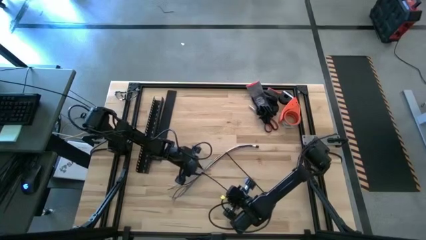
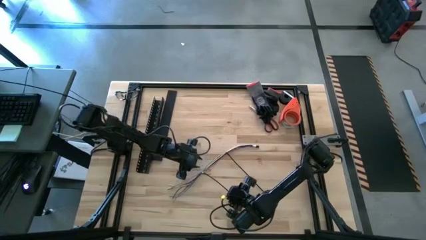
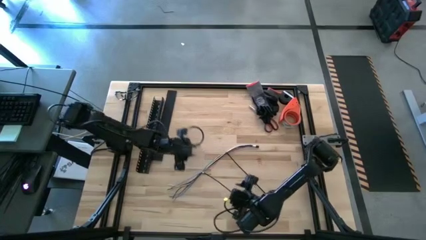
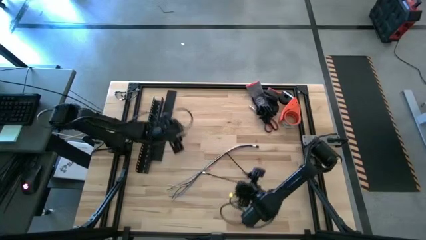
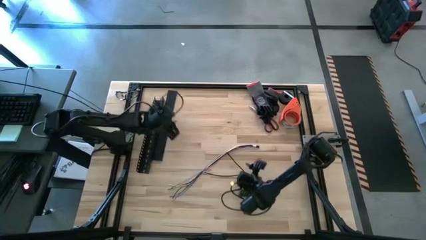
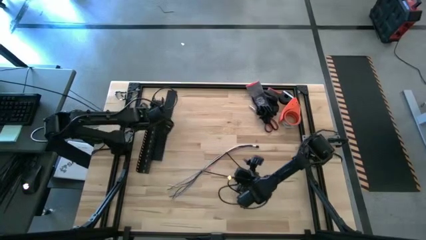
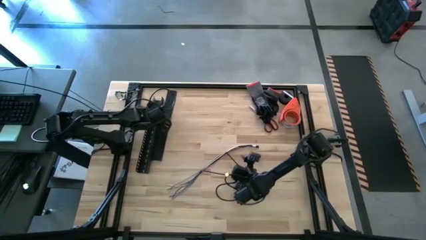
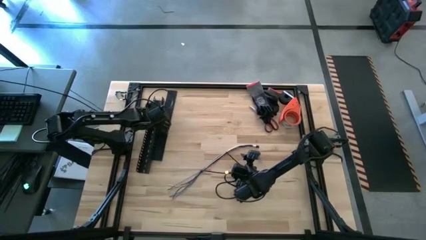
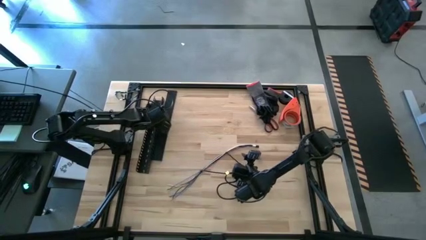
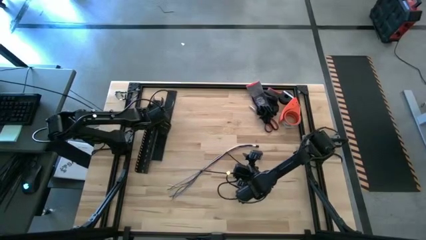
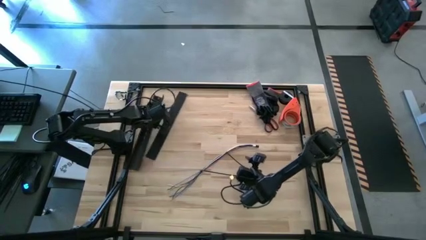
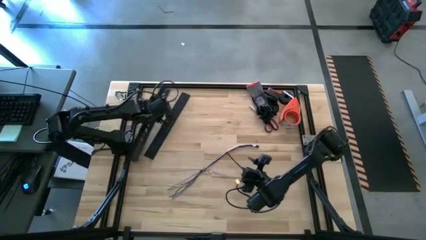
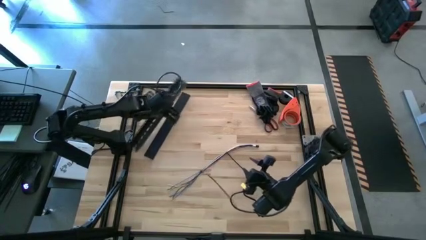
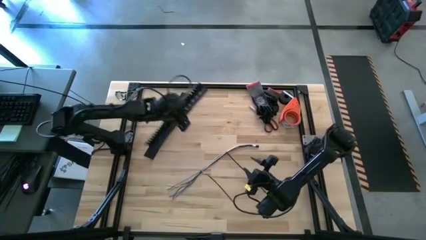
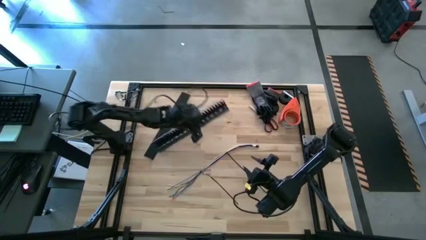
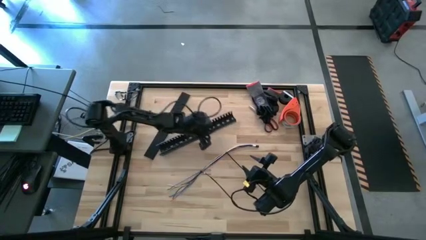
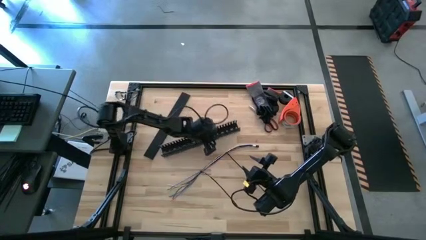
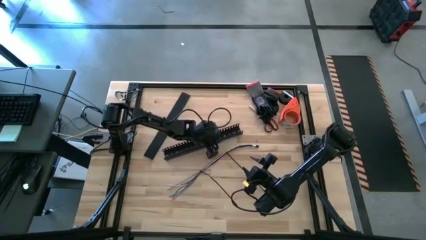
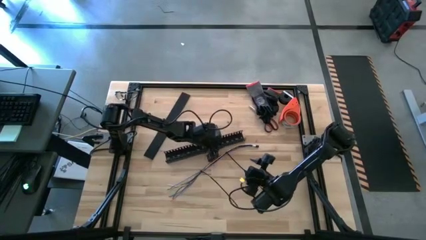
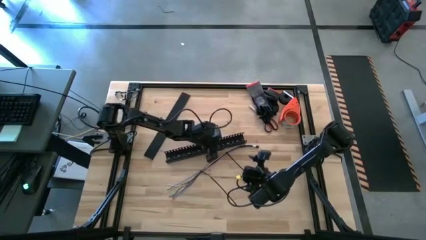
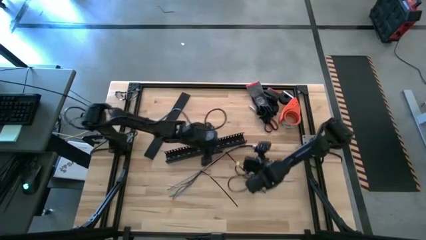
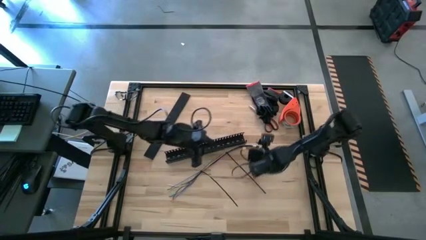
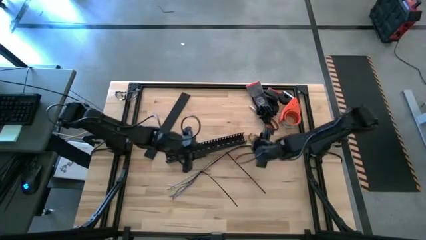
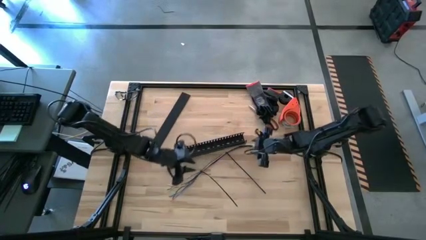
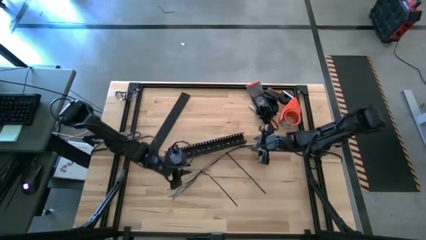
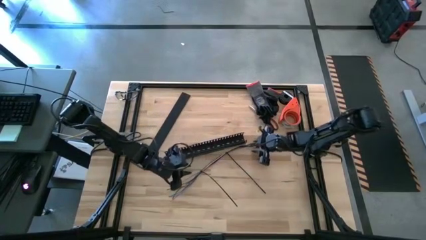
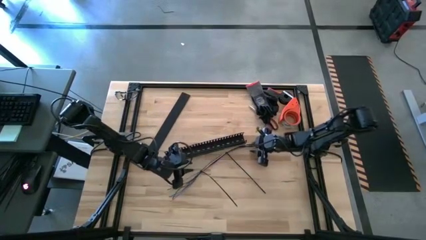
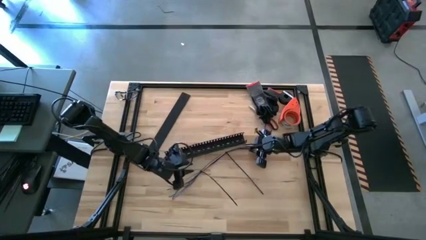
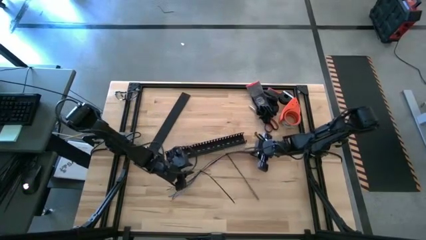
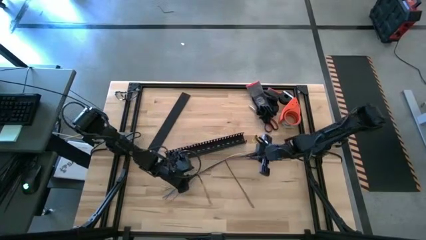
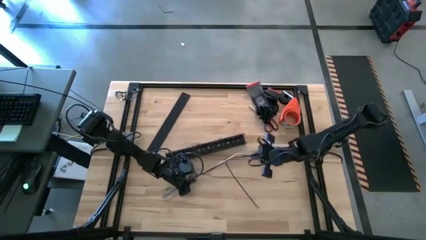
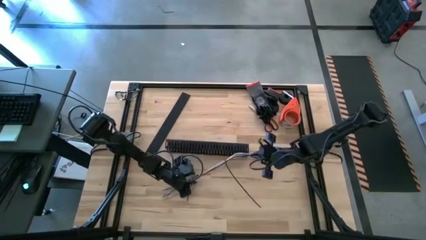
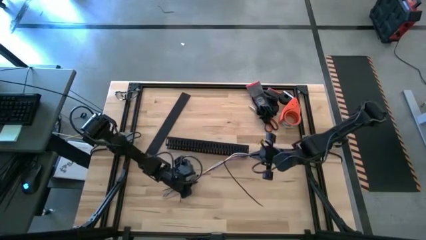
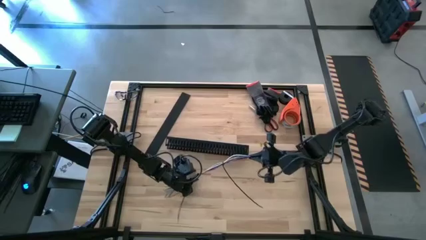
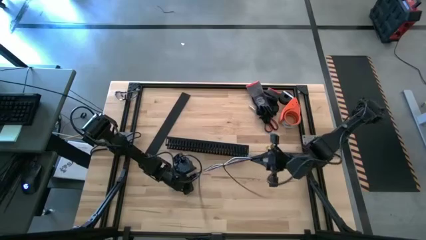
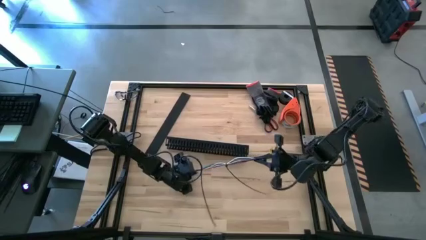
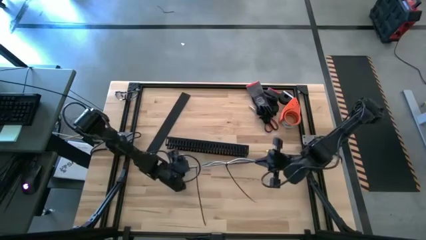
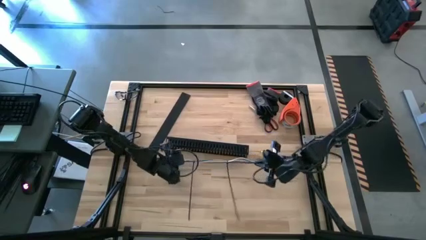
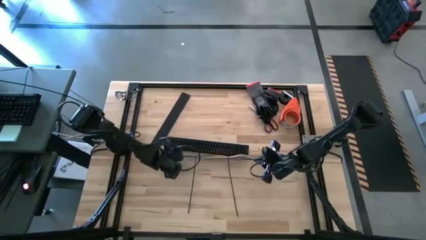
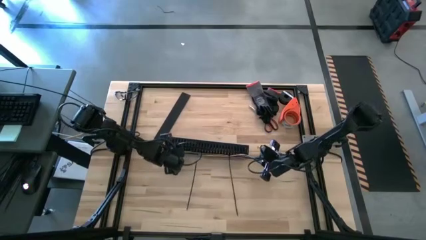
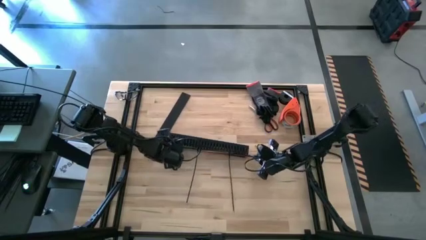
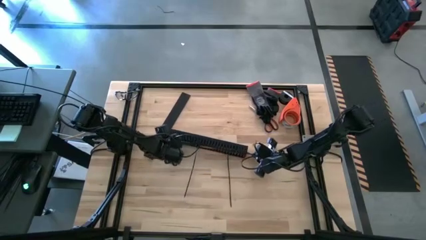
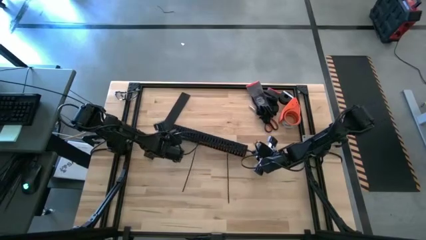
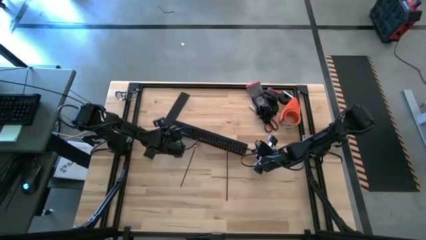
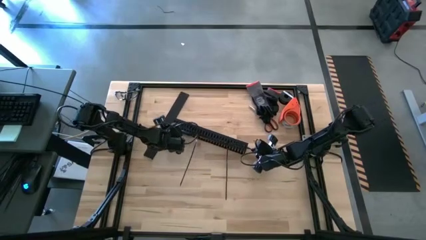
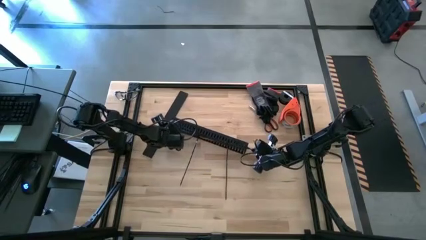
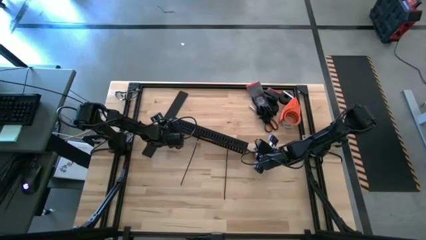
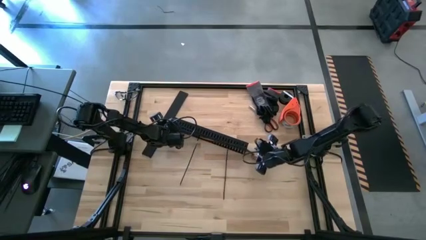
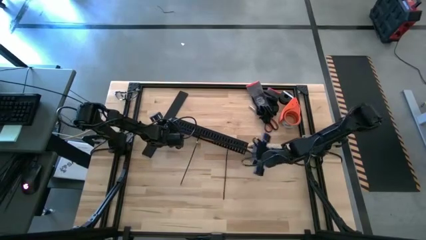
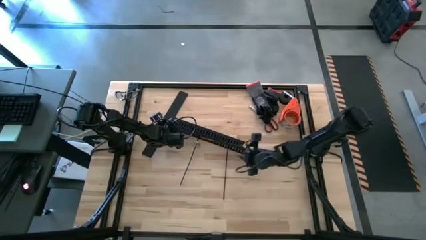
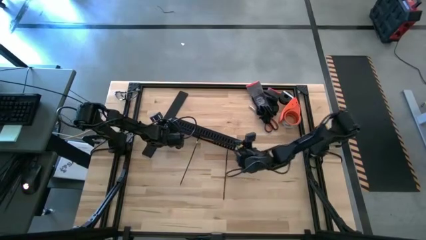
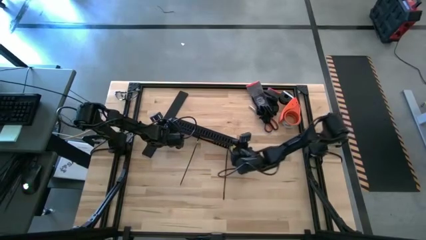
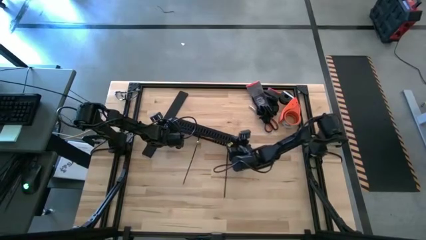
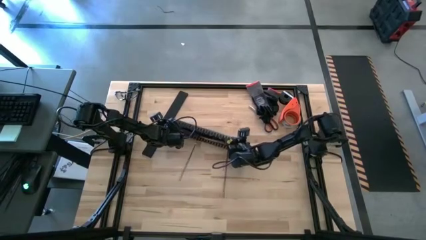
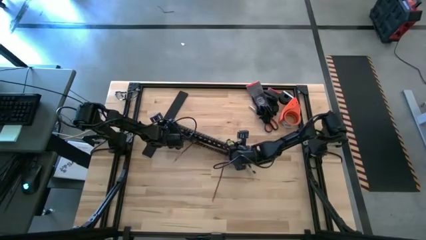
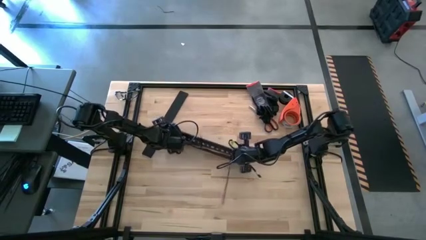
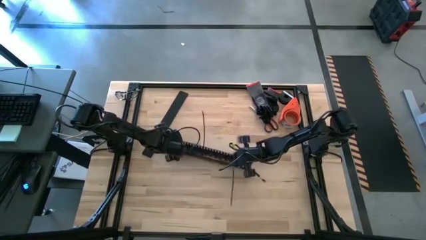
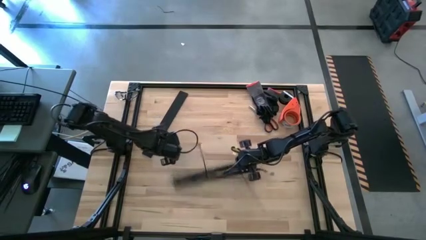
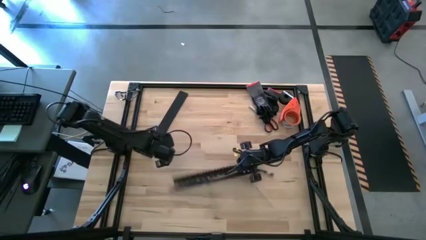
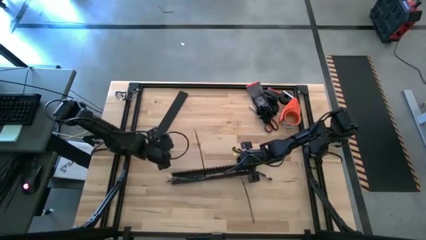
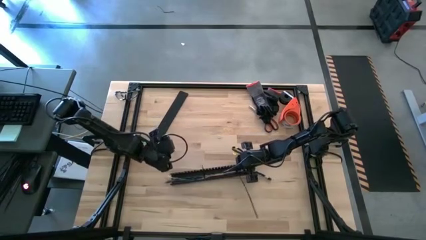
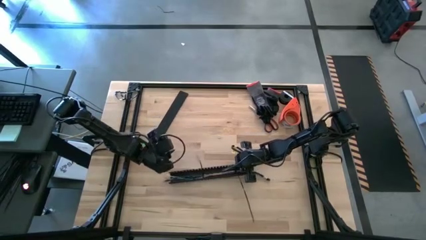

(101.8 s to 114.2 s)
Task: Ziptie cables
Put the zip-tied cables into the black cable duct
